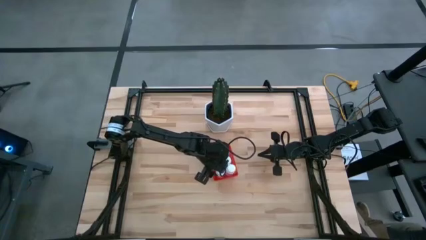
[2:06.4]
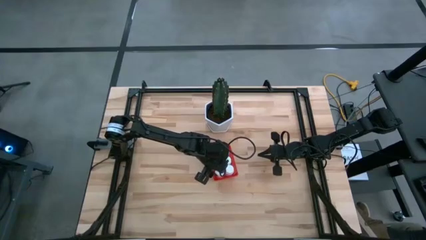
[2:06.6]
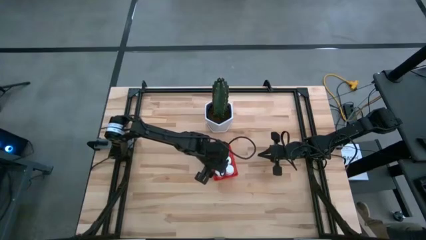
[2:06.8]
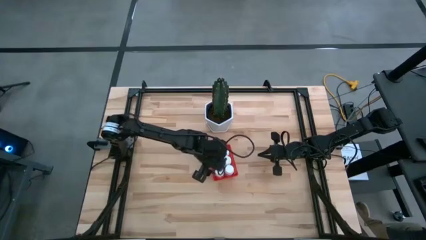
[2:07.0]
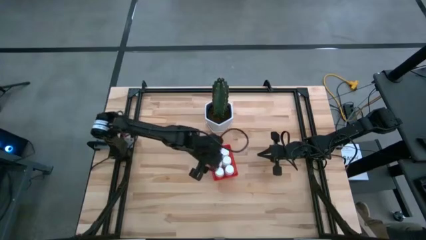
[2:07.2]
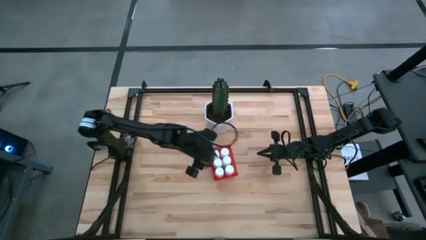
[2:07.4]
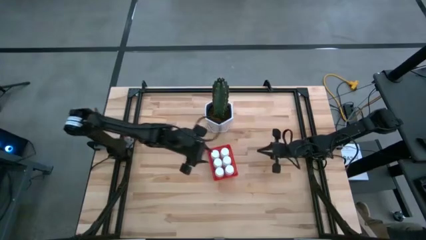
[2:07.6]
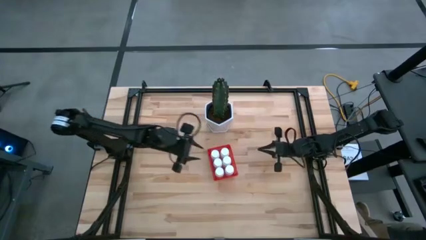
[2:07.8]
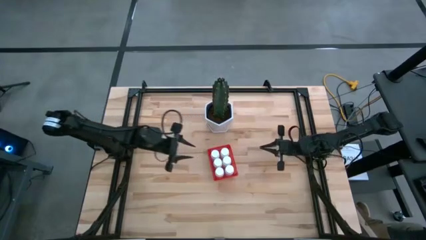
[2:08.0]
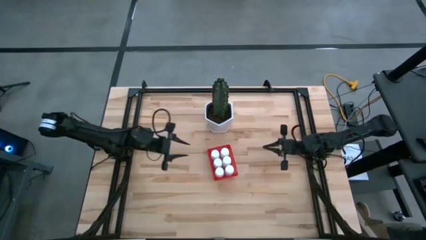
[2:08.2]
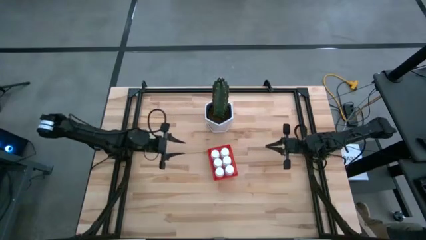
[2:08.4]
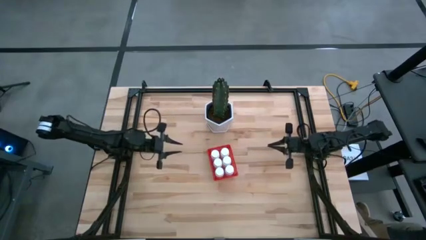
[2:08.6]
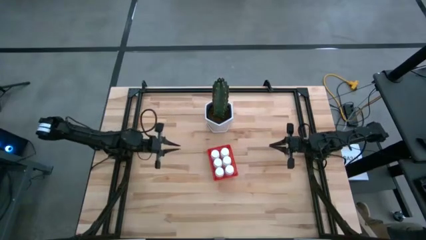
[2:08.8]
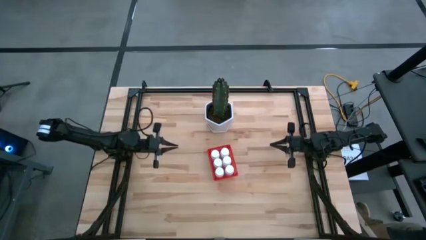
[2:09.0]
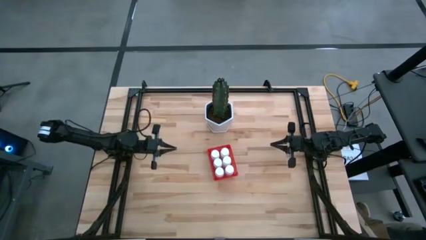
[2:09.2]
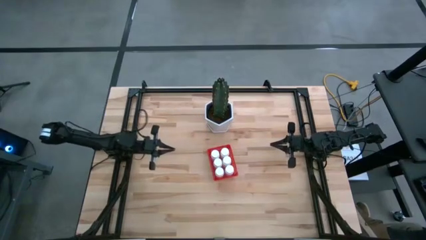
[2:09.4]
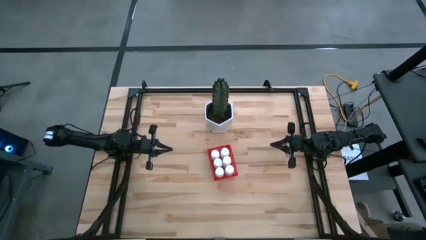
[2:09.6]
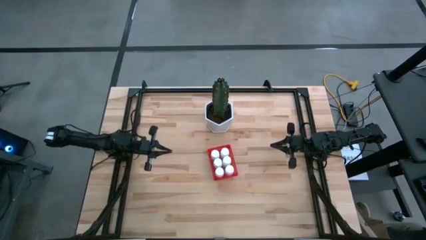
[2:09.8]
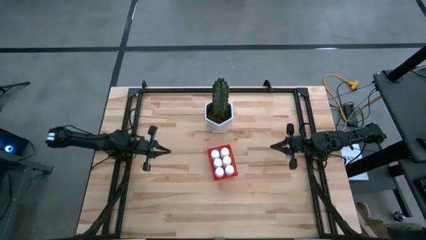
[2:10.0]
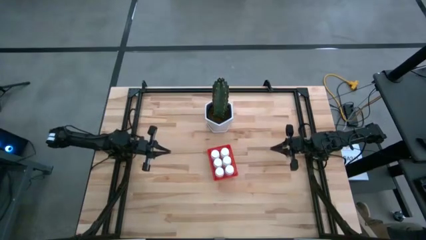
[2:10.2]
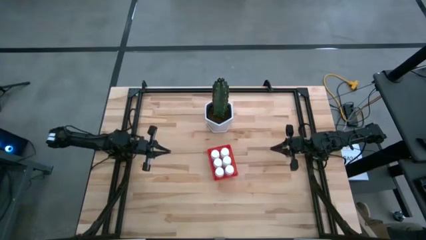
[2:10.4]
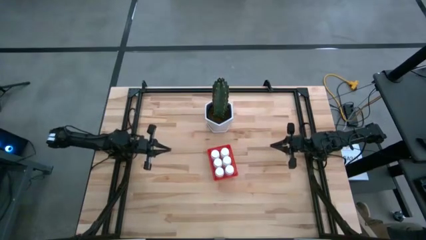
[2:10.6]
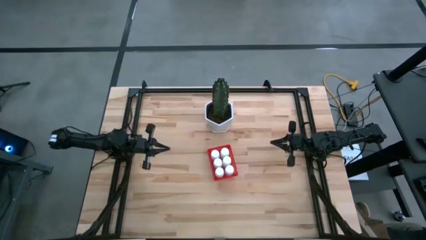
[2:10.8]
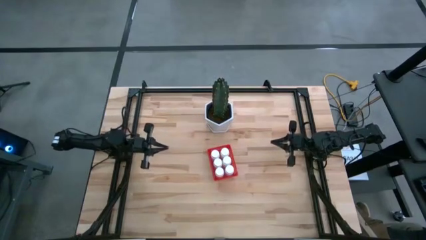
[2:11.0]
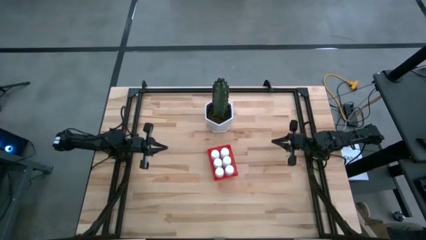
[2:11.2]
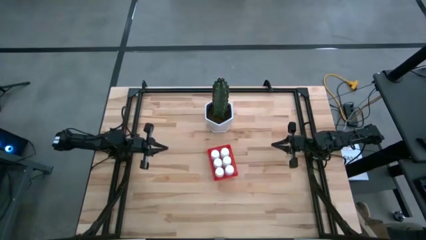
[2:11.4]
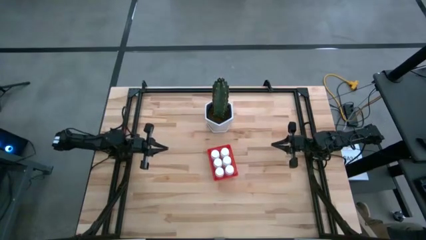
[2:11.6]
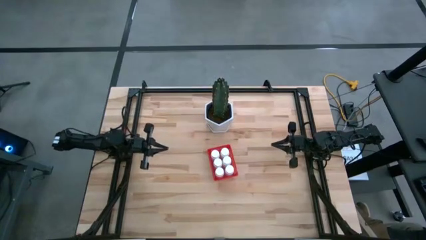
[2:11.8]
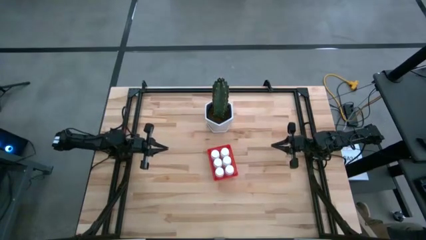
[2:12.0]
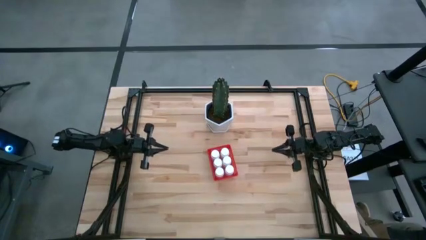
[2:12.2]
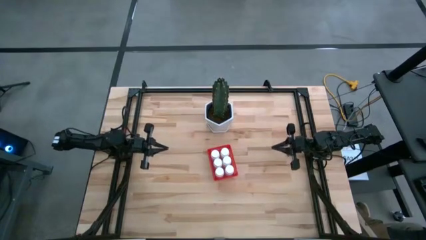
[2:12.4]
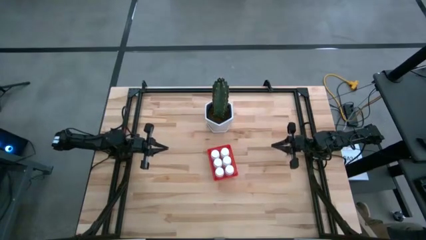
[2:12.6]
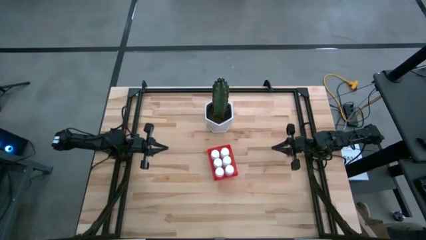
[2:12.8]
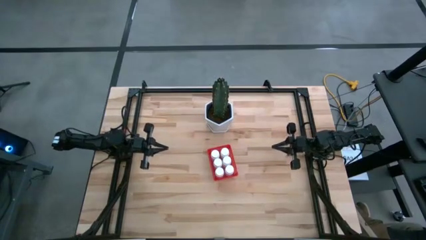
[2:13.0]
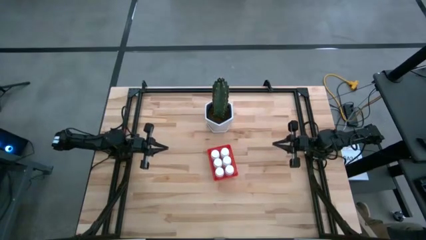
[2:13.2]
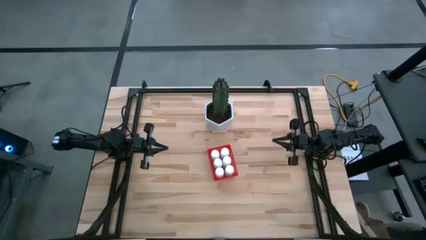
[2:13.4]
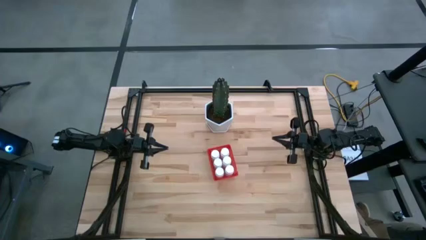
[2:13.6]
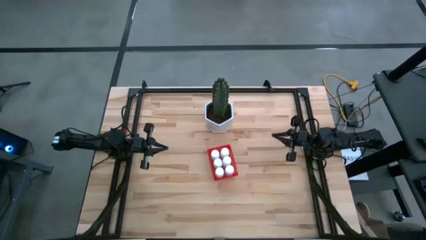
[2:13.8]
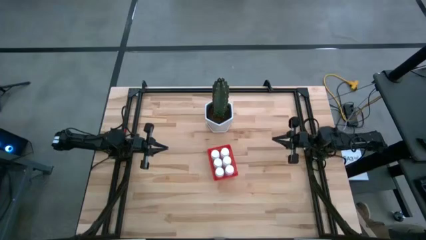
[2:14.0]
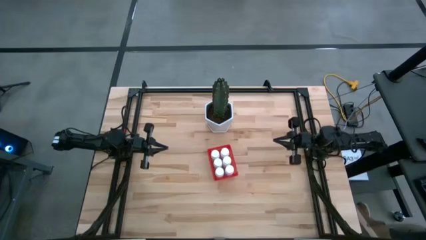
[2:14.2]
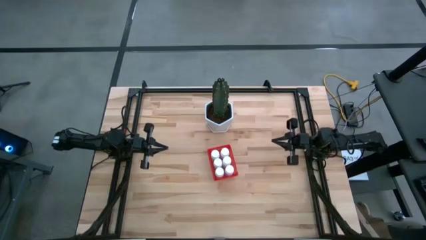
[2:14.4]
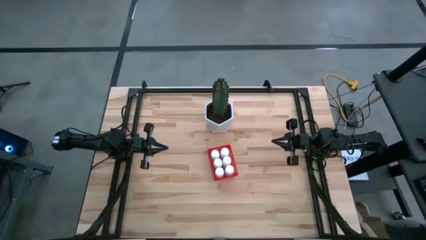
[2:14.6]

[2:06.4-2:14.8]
Task: Pick and place pill bottles into a basket
Return to Home Position

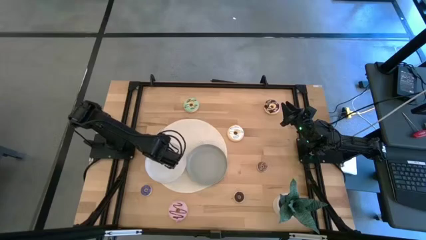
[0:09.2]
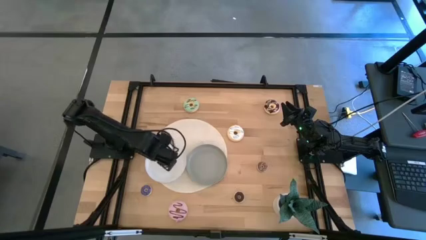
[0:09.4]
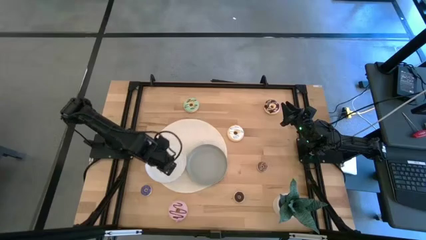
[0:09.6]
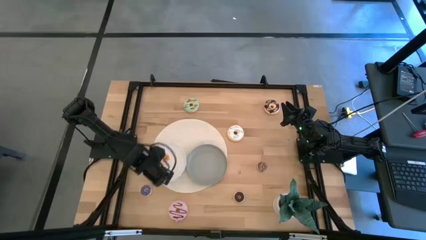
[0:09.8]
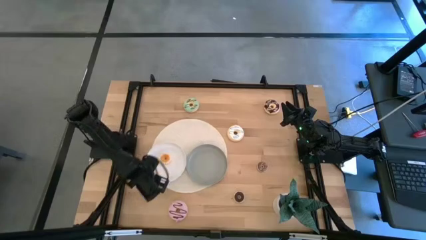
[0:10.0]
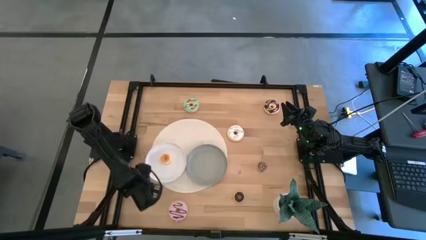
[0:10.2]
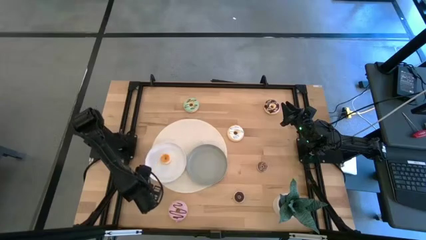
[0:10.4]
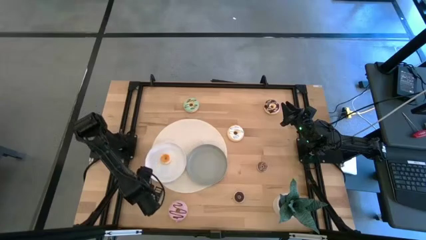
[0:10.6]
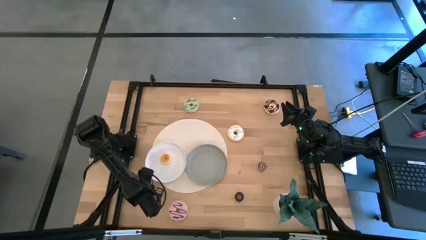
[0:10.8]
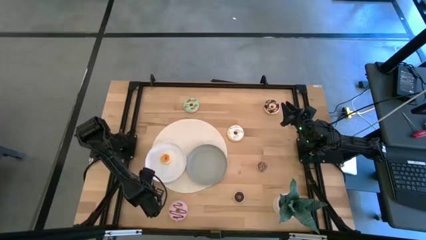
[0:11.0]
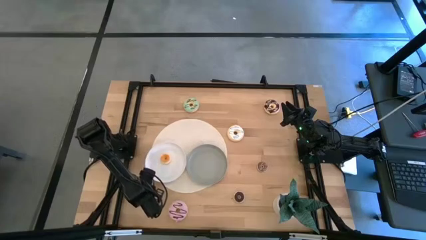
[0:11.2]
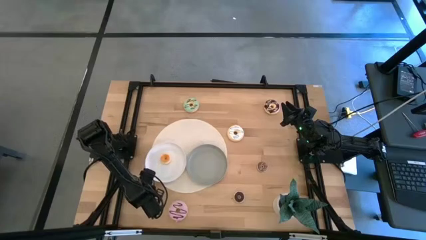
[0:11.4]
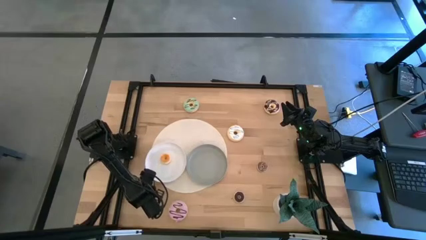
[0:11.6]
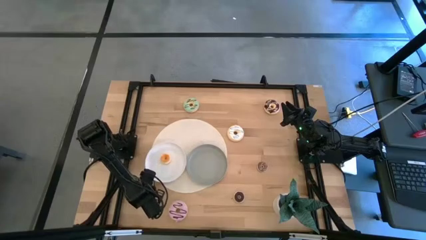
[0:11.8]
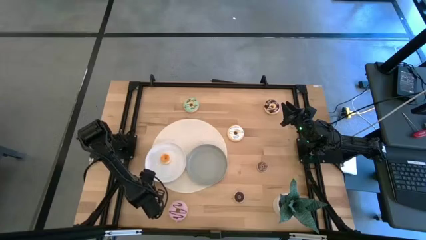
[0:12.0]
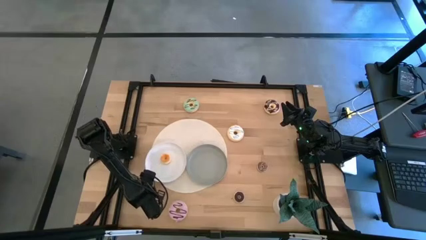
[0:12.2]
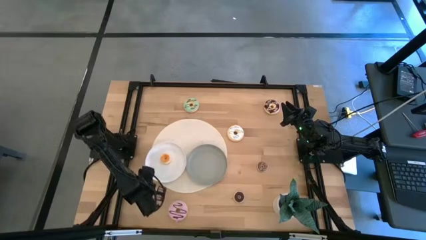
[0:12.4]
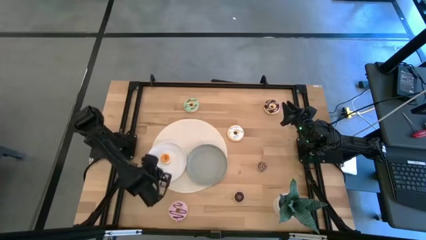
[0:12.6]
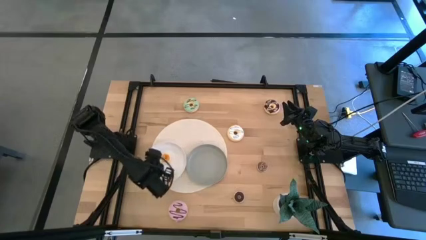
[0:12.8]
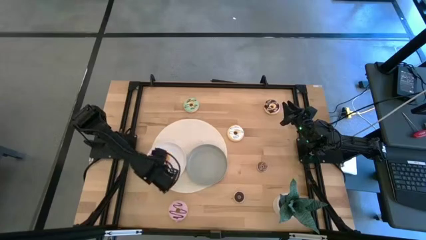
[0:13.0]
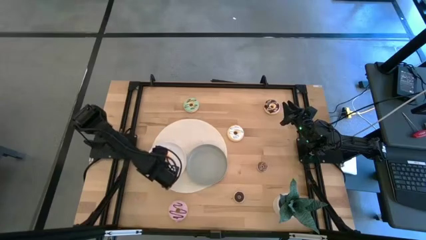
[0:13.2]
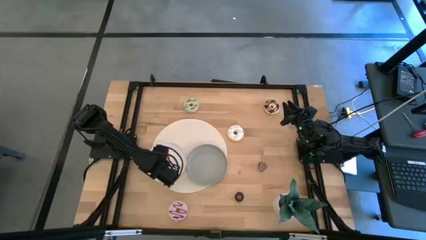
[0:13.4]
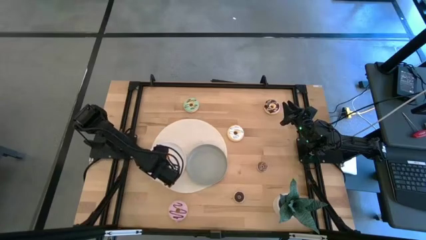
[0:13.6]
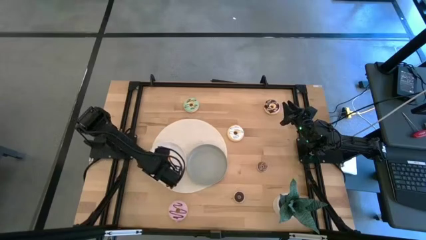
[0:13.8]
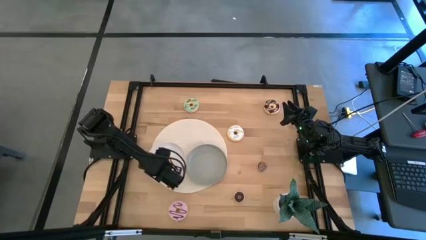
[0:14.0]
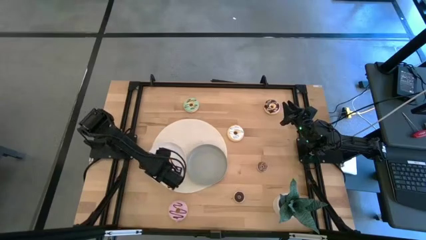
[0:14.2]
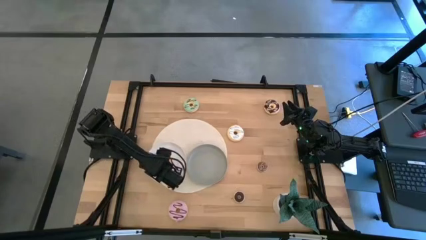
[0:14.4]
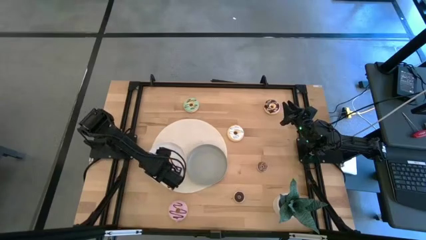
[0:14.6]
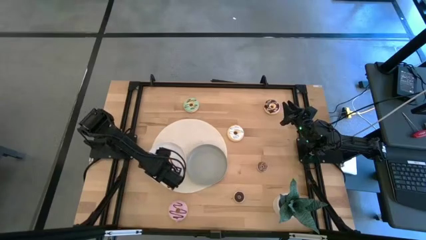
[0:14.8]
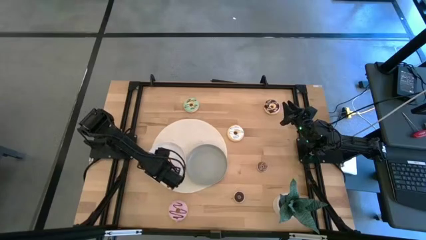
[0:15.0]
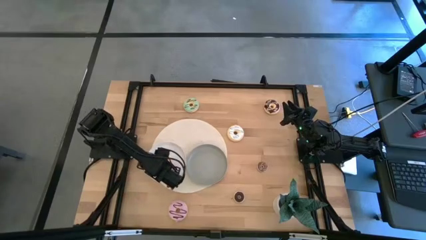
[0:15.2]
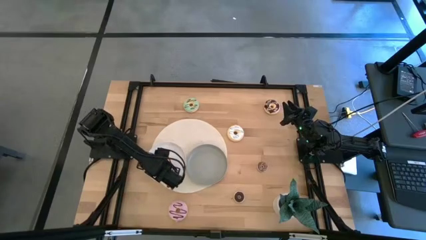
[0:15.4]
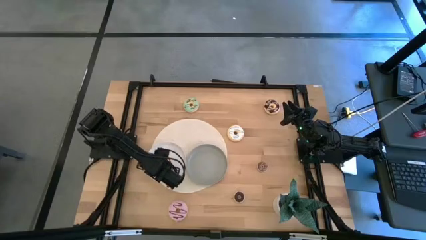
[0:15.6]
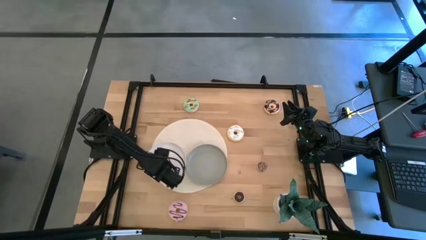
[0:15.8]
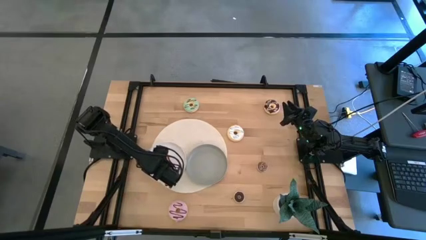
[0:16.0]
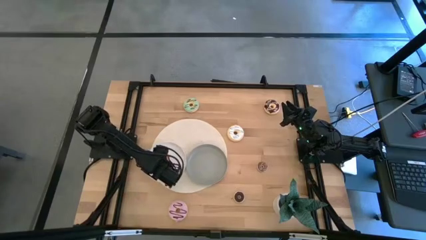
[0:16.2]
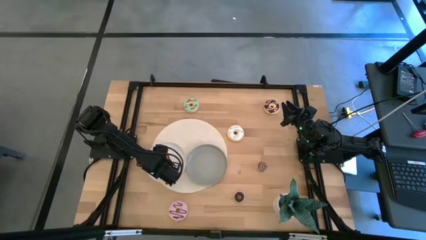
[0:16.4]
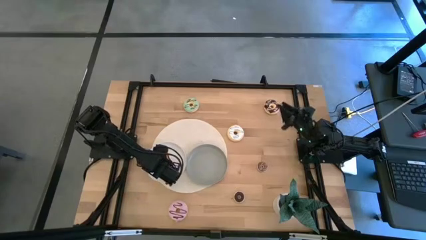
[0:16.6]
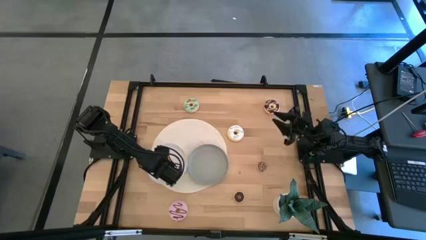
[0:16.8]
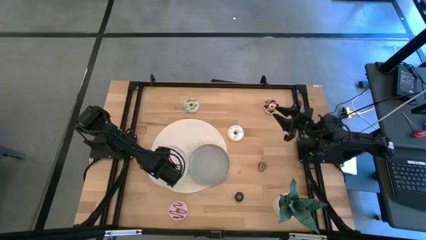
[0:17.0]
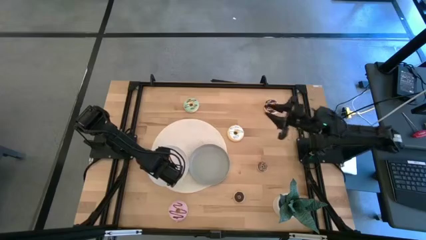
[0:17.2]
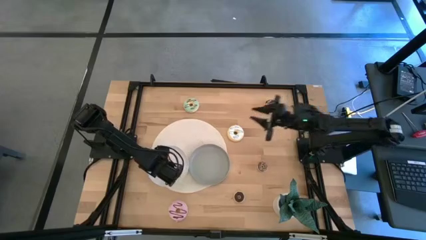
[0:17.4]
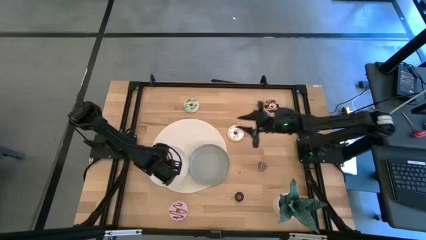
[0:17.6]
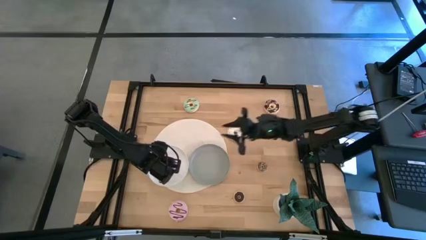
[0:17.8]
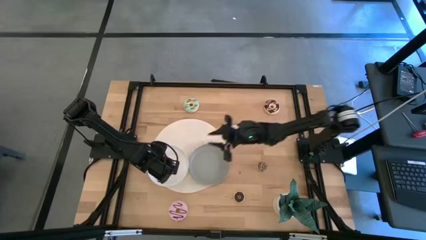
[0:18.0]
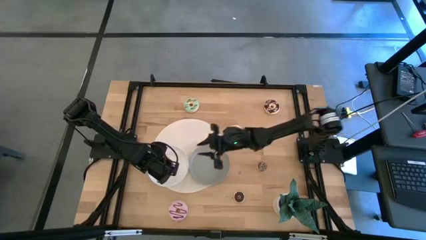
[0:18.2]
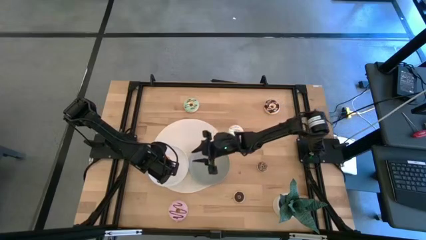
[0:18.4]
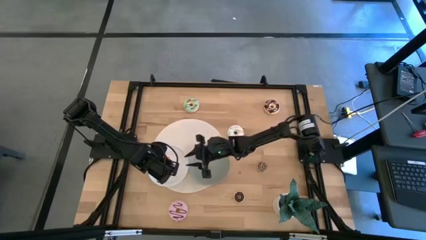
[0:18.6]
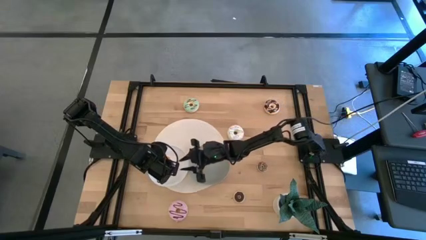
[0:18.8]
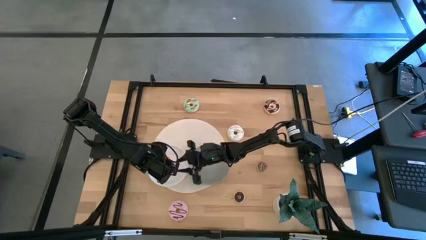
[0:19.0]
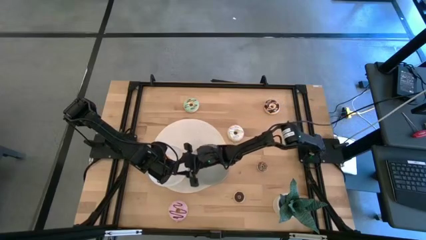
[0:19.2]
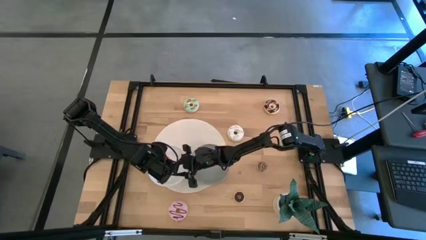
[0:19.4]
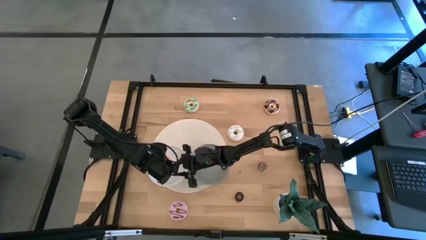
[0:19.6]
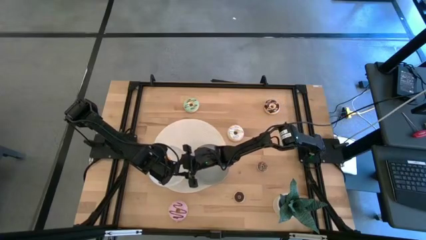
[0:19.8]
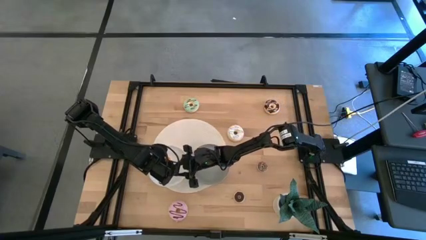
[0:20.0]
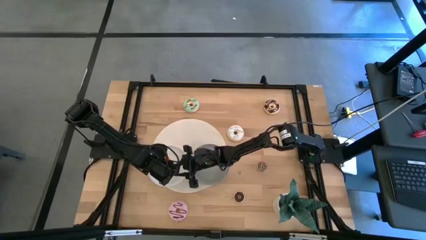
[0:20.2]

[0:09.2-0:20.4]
Task: Pick & Place donuts
Put the small blue donuts on the white plate
